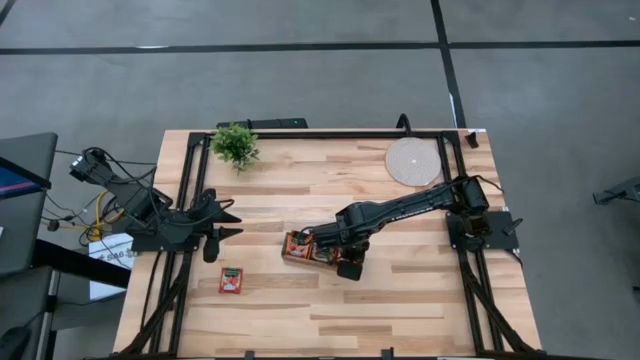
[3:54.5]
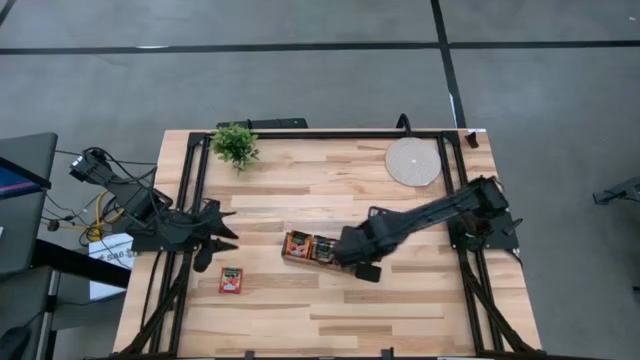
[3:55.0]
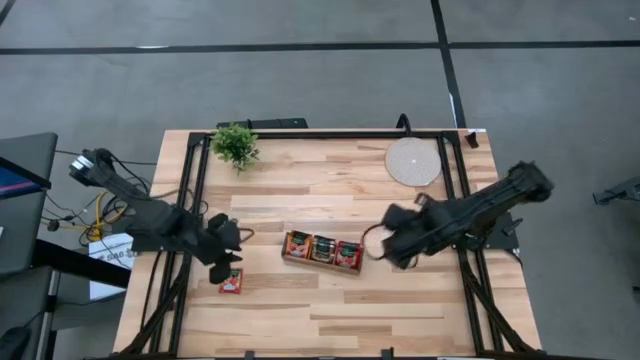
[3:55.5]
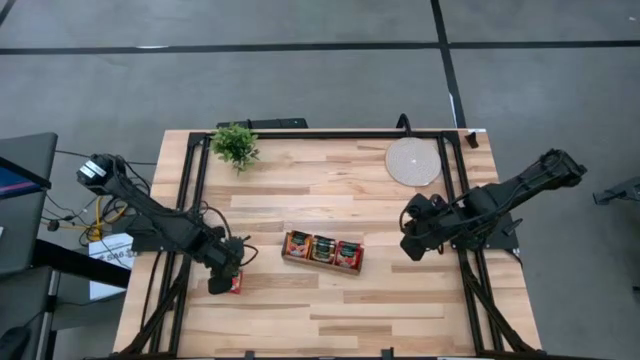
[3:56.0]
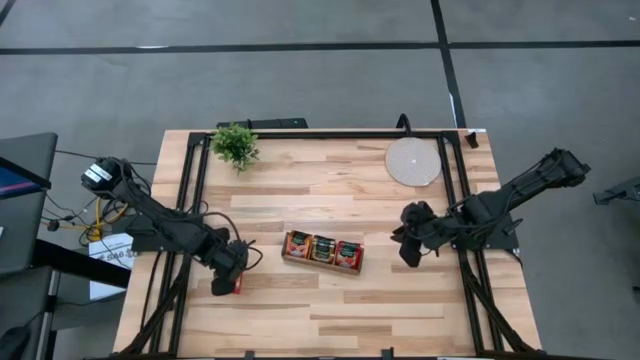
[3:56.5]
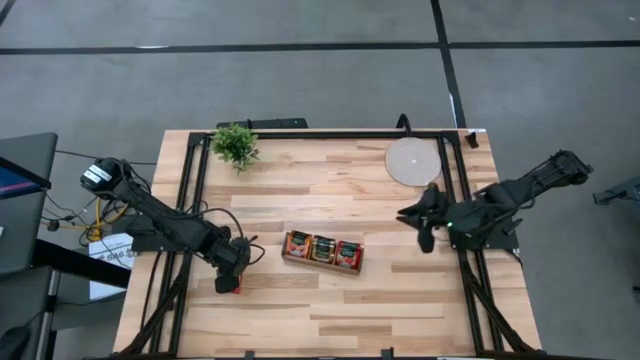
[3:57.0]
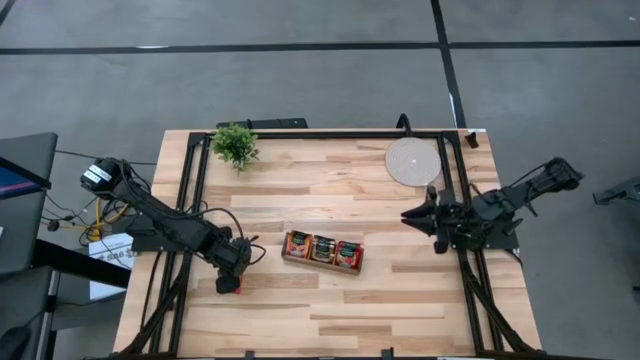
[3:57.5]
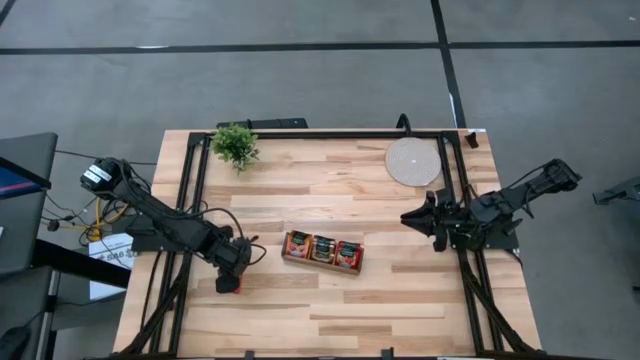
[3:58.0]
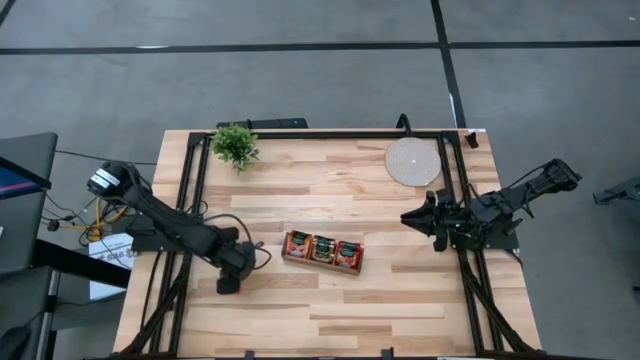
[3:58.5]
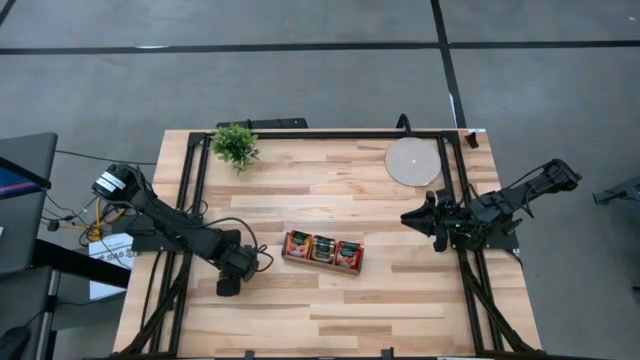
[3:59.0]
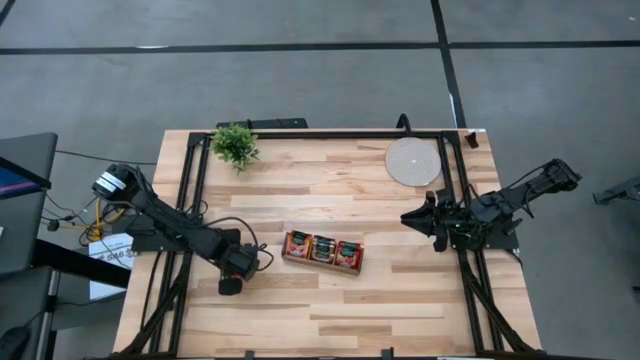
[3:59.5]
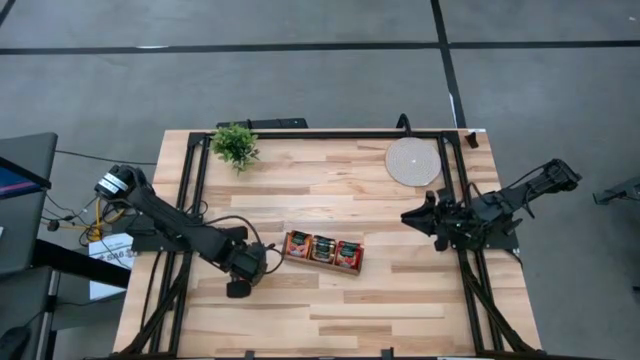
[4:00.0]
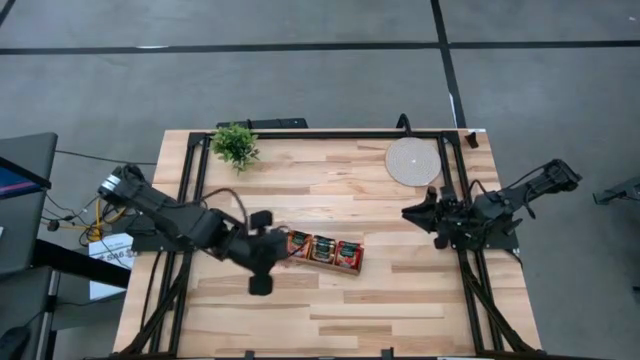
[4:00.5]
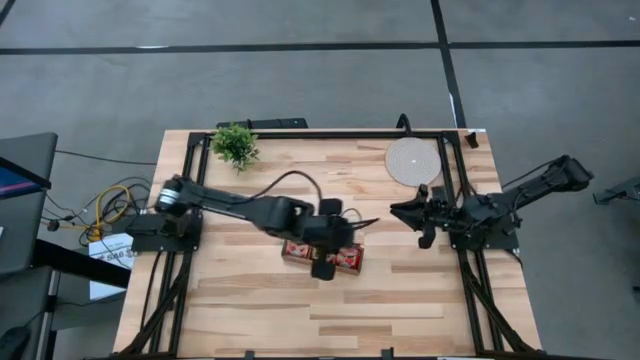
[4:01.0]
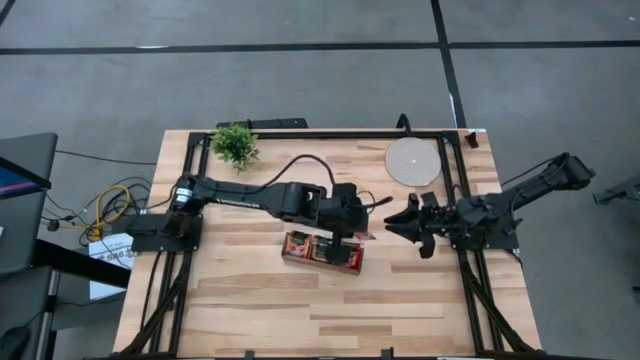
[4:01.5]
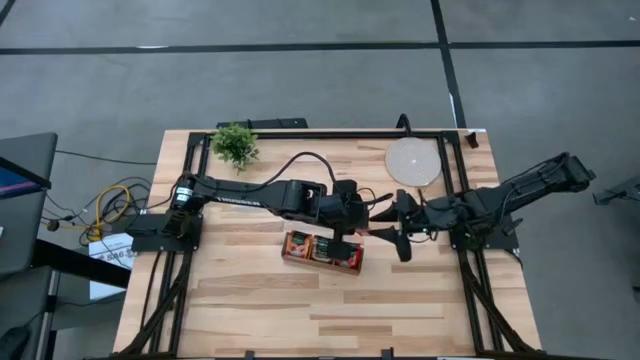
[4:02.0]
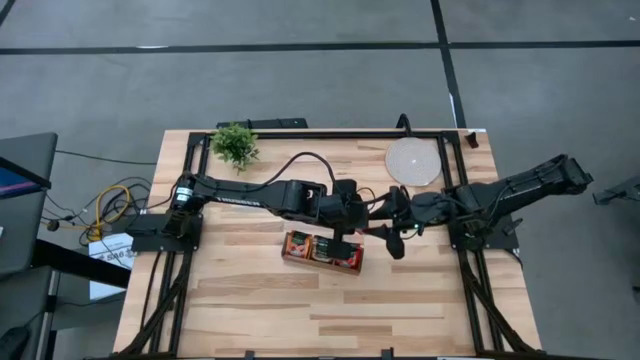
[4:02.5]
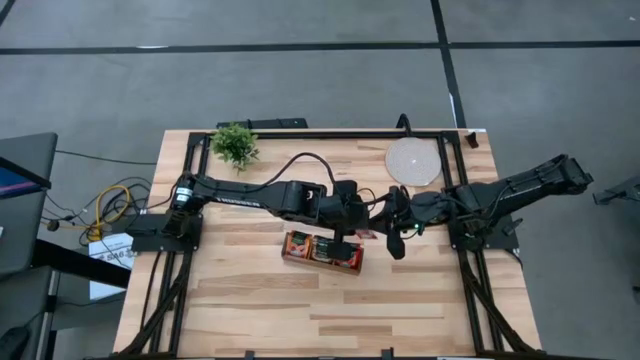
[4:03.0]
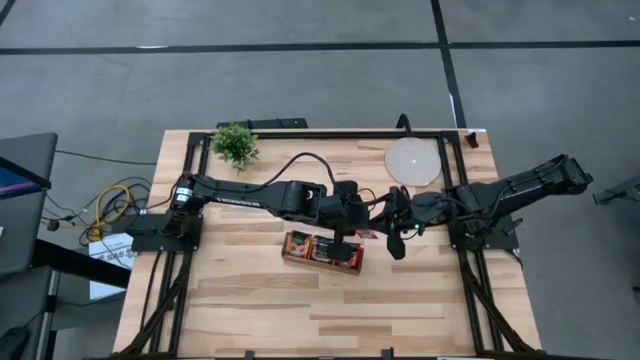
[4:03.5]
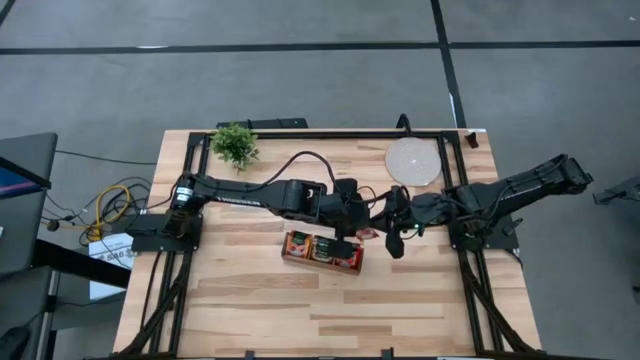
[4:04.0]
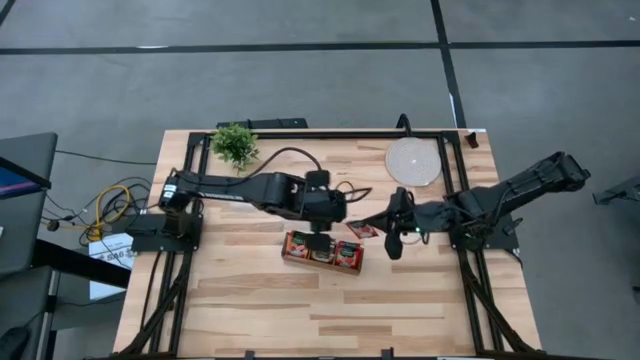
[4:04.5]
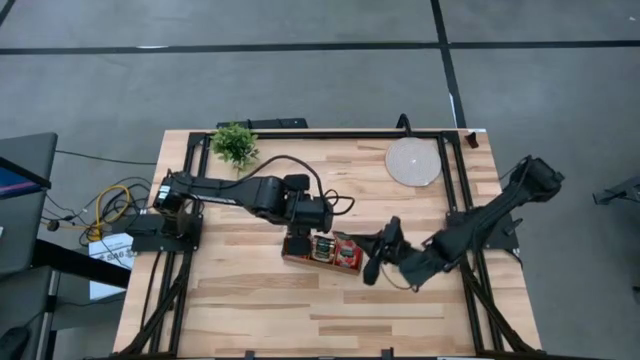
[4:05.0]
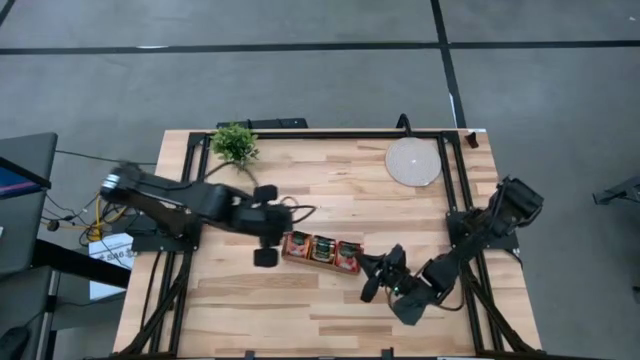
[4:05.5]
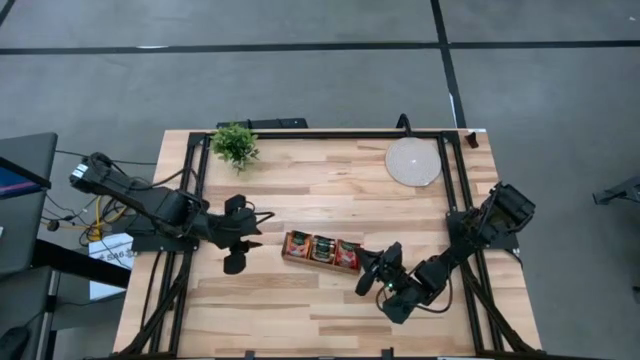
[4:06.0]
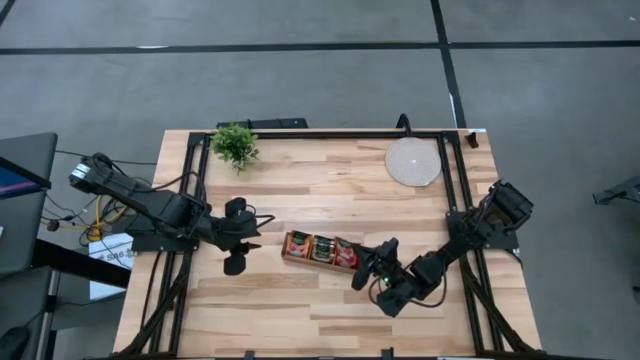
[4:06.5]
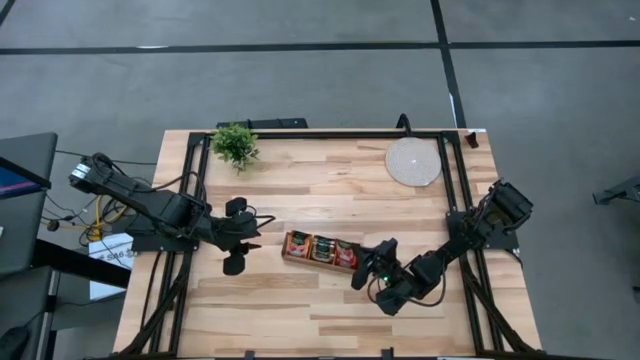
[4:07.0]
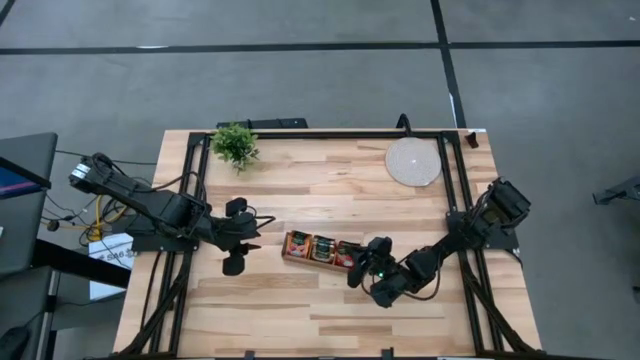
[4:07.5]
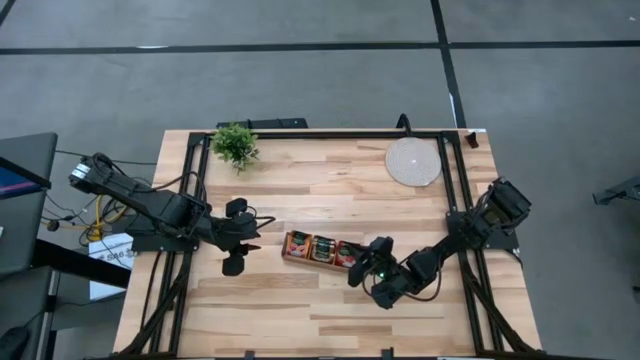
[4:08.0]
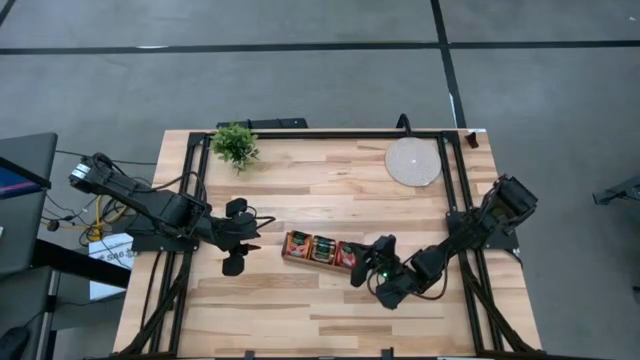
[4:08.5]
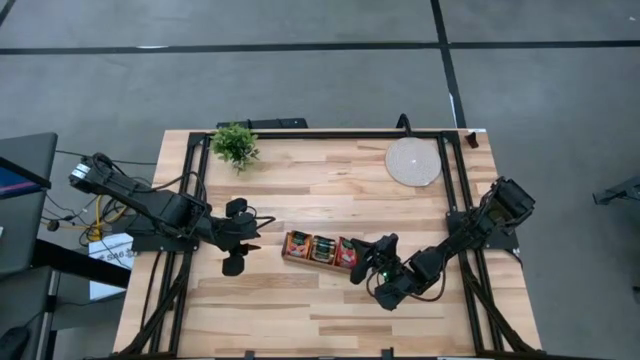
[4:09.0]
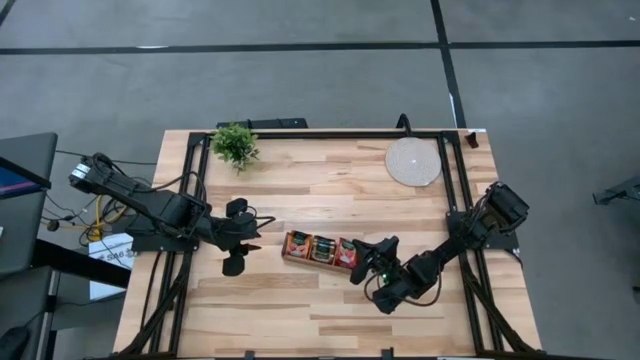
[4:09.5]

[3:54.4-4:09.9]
Task: Pick & Place Tea
Put the red tea bag into the right section of the wooden organizer

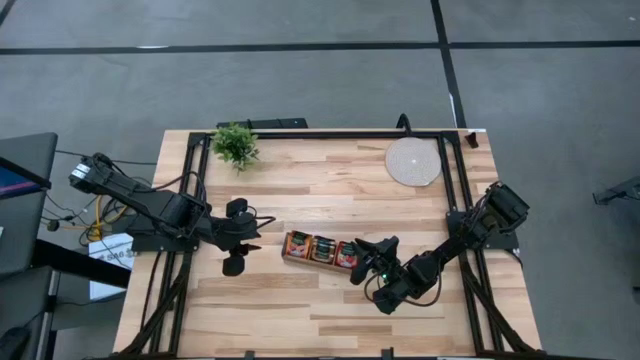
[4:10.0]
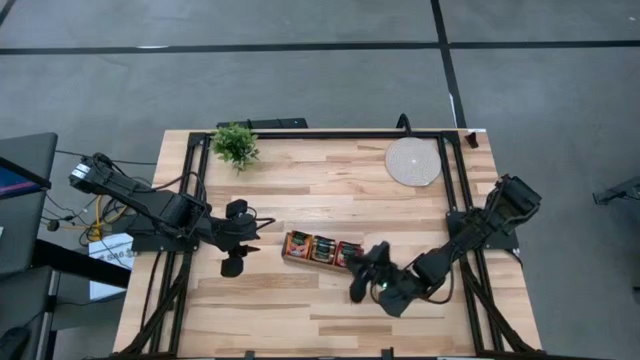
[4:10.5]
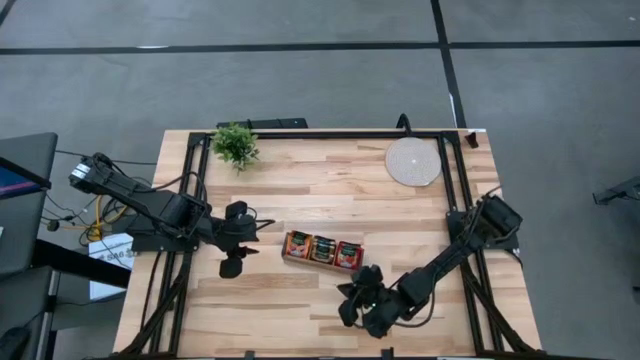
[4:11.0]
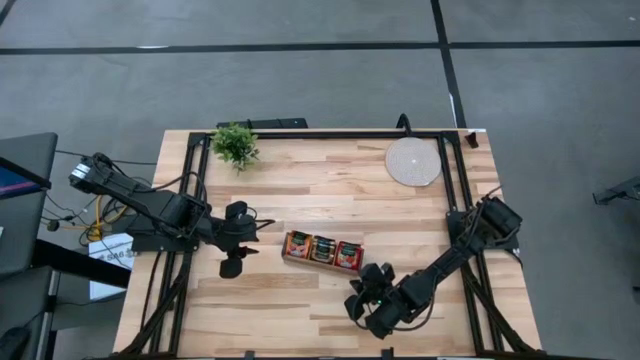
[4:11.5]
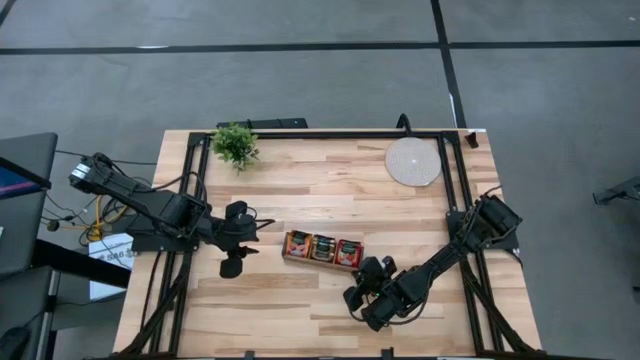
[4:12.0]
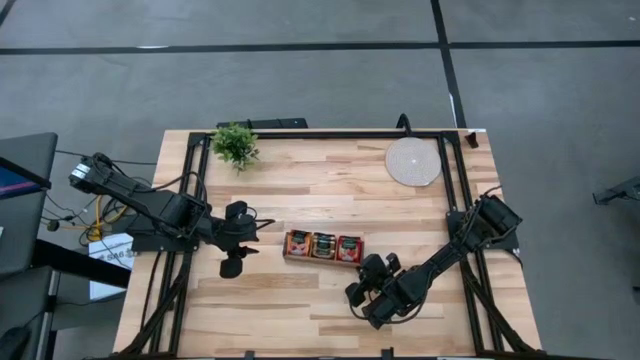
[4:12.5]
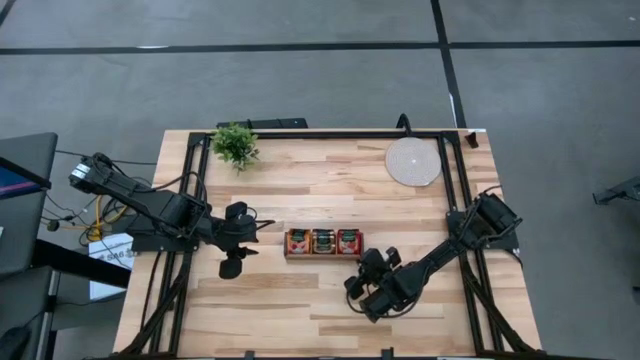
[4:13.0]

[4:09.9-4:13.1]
Adjust the wooden organizer
